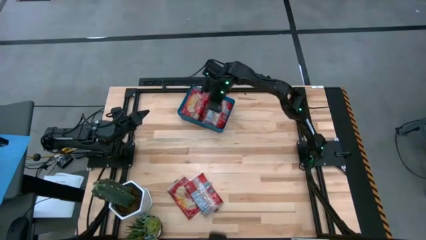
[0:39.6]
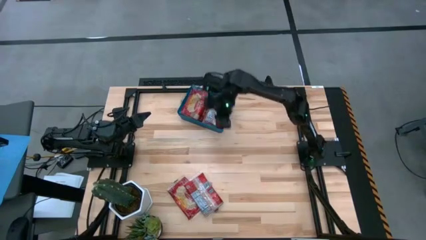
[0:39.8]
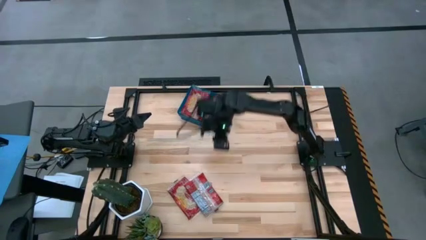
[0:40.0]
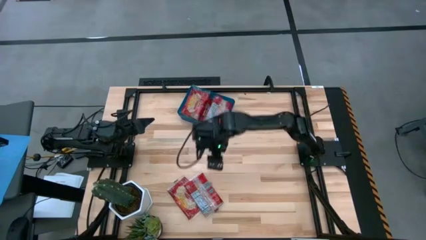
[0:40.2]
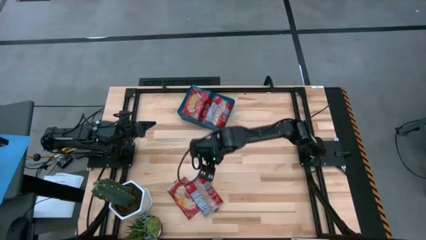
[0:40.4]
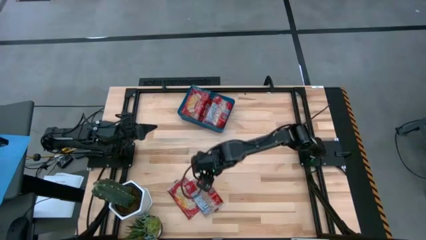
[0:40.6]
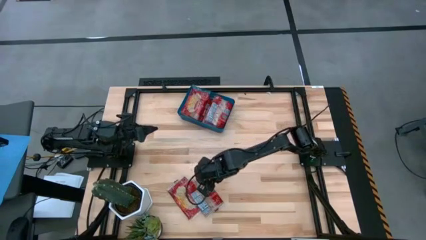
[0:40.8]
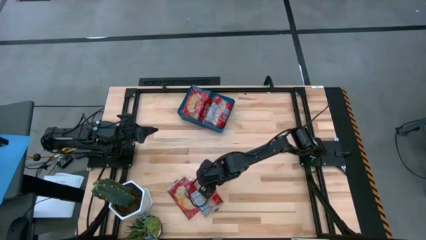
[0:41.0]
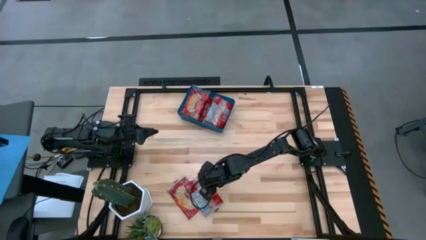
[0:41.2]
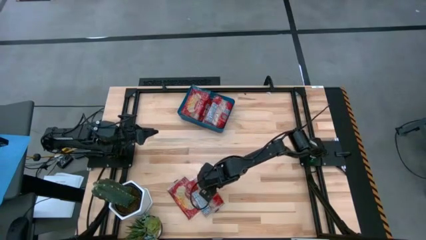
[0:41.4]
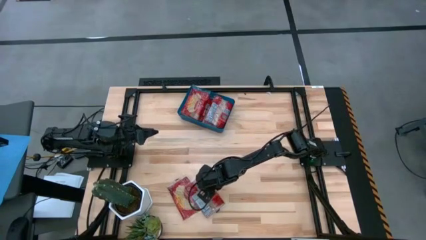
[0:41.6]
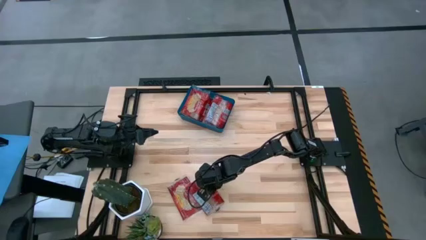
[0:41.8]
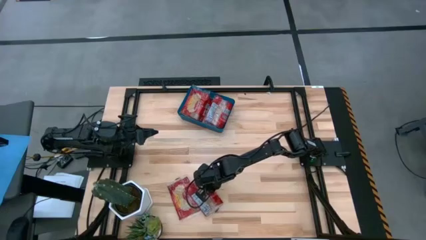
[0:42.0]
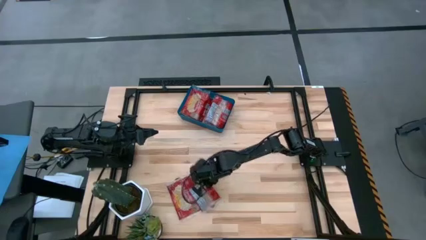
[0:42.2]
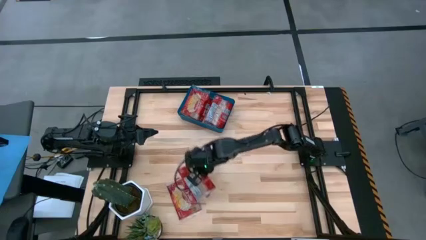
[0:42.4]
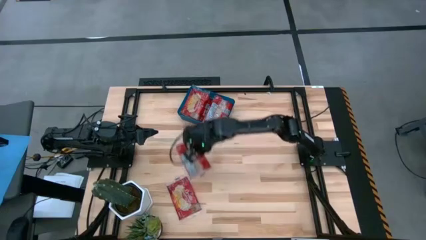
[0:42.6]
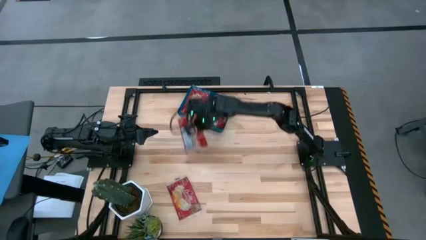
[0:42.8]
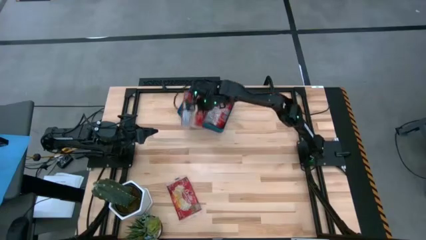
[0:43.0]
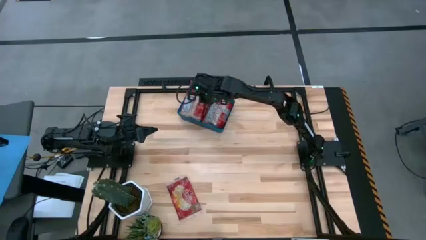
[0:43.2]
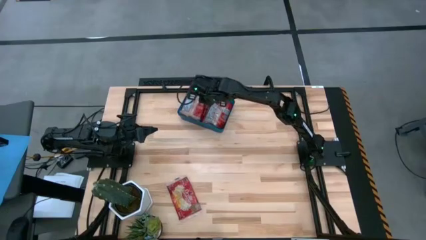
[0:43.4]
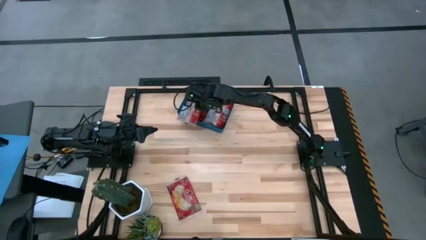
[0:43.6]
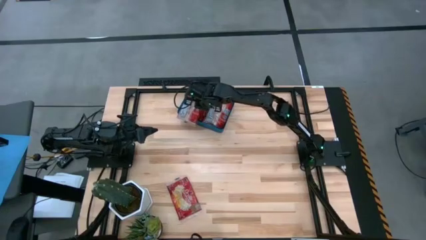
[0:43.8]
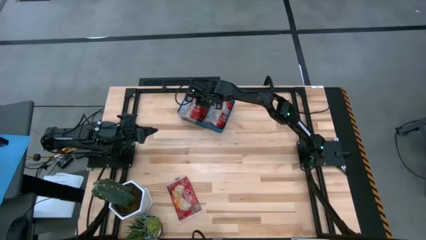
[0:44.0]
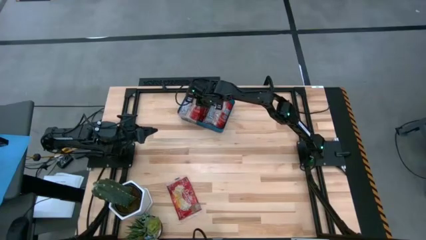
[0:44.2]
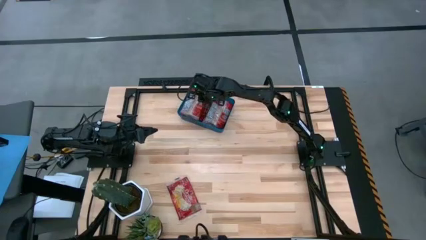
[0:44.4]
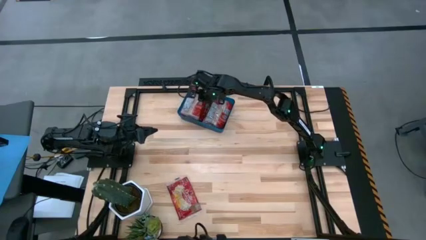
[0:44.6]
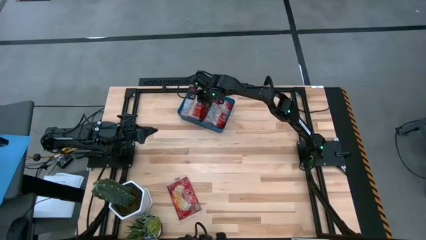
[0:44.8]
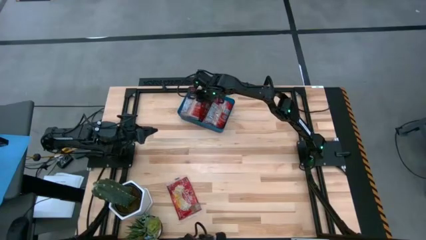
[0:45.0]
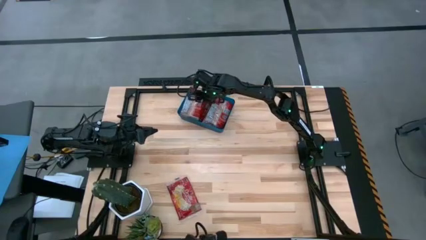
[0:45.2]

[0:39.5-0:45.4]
Task: Sort popcorn bags into baskets
Put the red popcorn bag into the blue bin

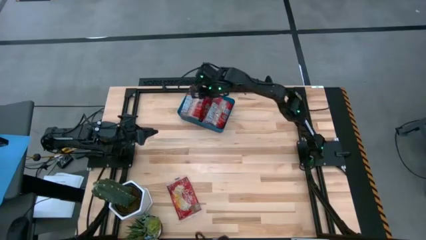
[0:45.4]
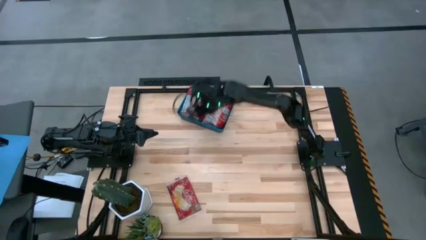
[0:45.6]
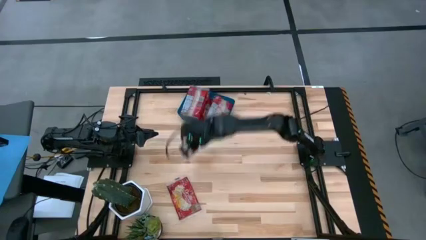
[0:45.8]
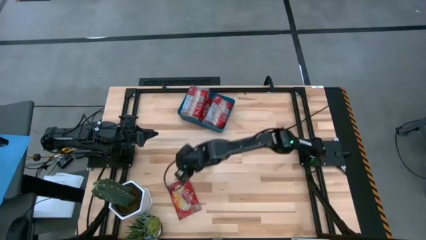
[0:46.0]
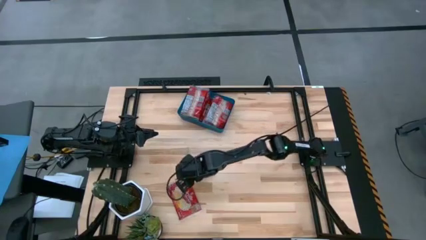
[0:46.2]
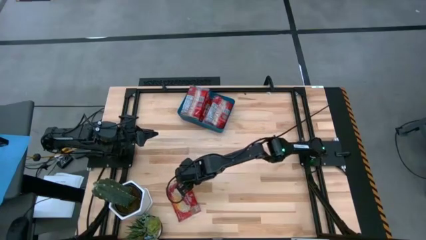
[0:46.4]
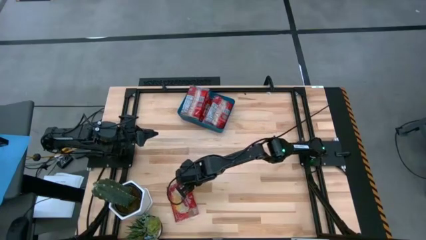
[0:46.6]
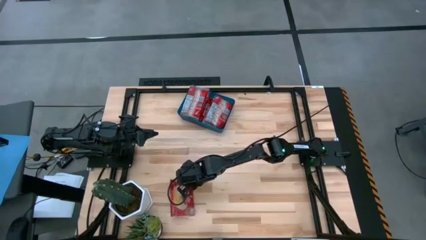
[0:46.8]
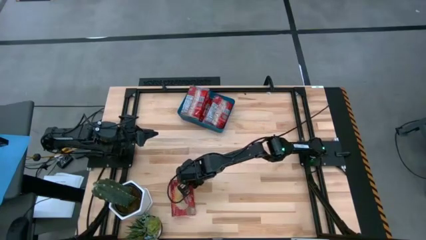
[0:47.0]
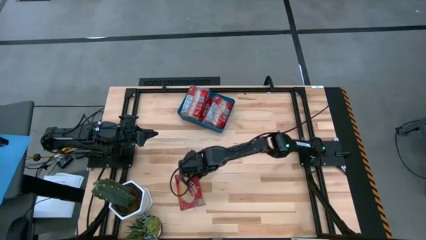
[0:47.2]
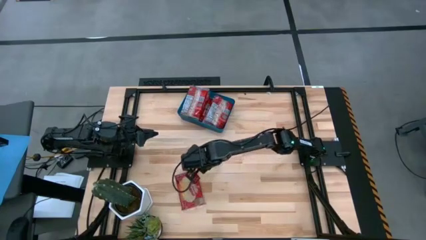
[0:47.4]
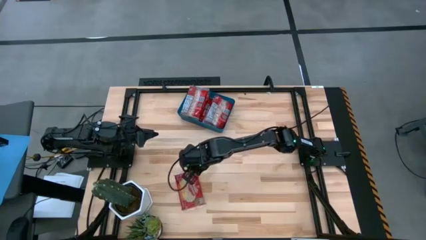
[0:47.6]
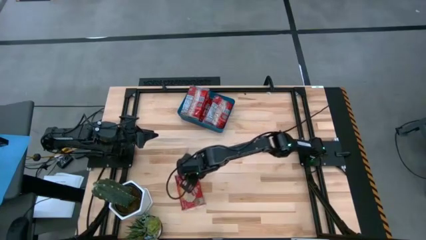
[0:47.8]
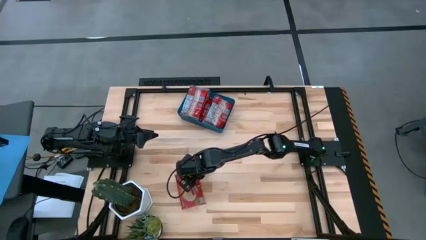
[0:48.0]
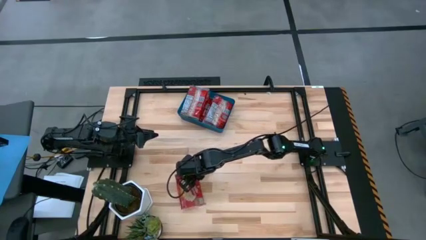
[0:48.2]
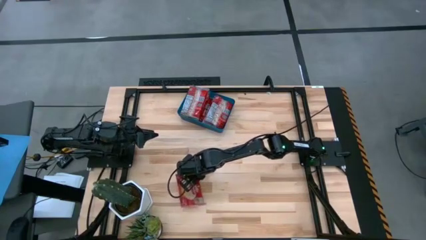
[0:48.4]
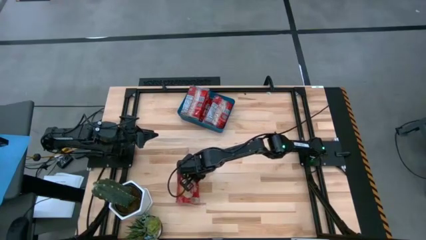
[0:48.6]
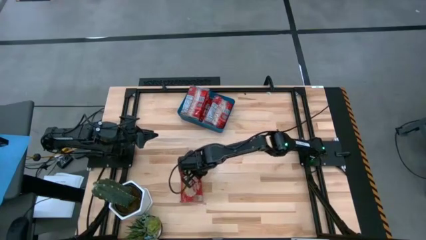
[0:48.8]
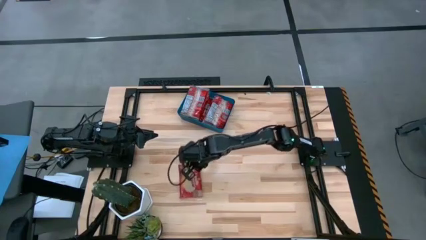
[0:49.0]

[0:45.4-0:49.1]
Put the red popcorn bag into the blue bin

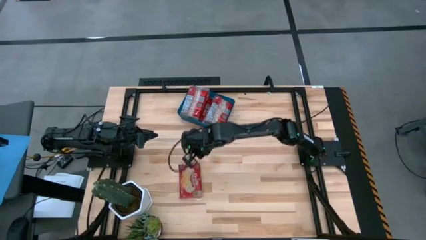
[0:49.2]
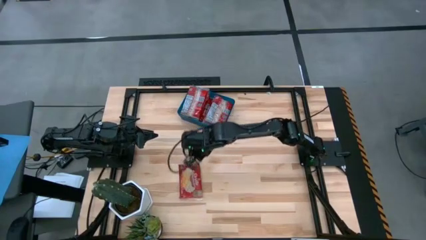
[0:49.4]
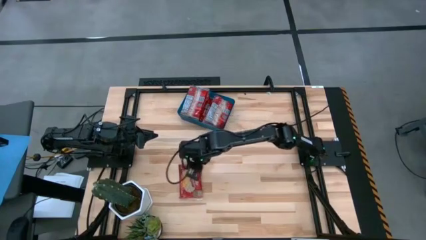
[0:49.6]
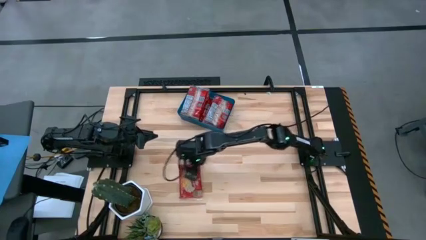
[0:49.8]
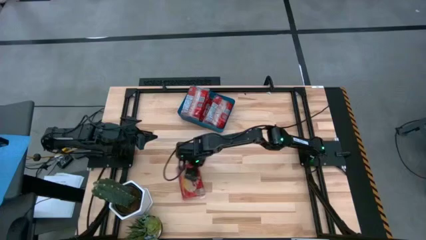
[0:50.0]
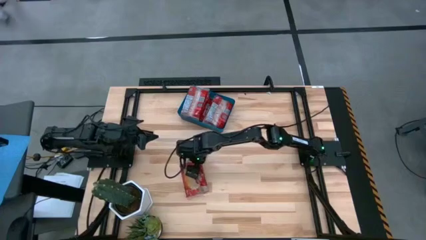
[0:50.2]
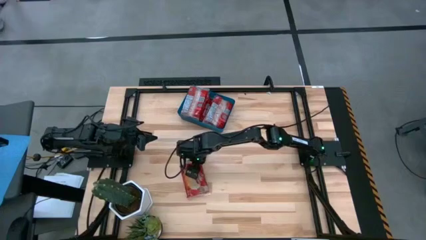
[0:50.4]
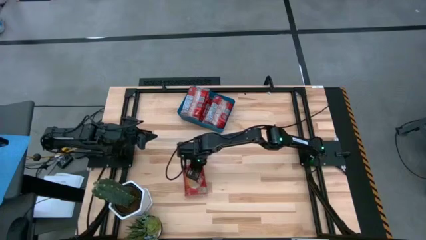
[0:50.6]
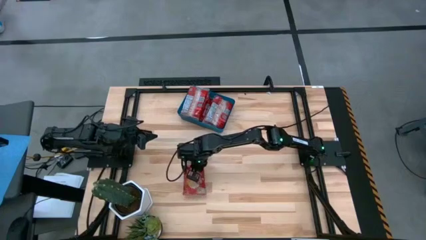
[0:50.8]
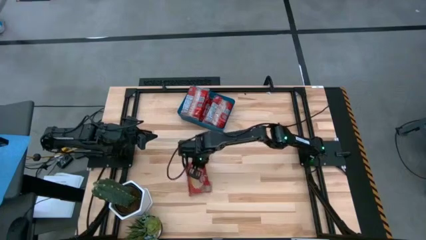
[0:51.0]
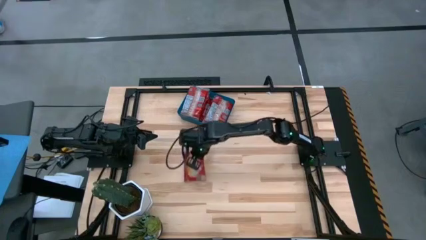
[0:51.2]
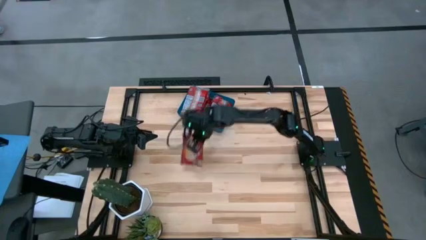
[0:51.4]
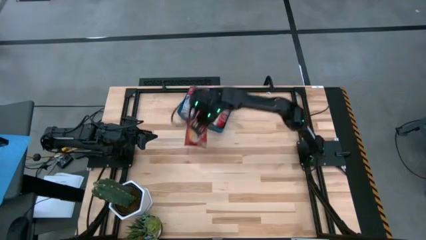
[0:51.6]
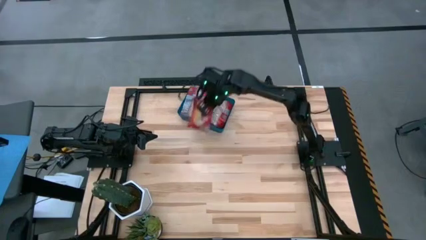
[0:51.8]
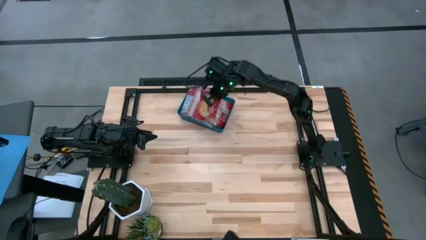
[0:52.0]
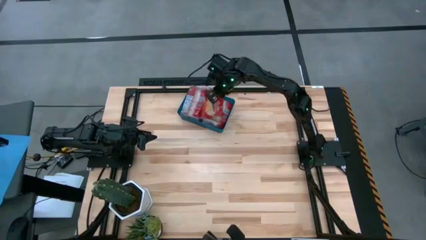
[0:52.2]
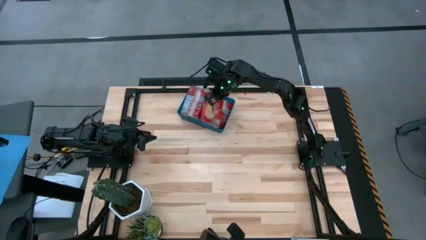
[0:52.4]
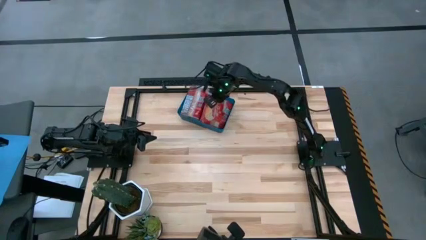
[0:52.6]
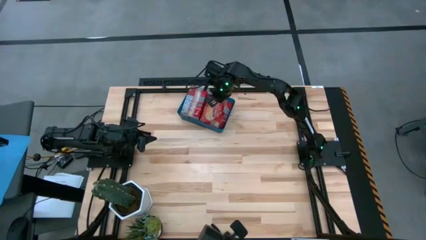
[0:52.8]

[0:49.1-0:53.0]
Put the red popcorn bag into the blue bin

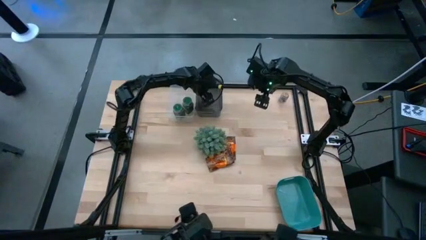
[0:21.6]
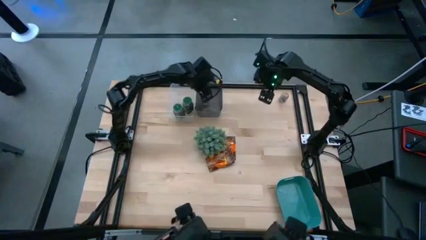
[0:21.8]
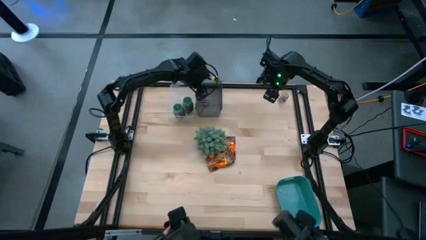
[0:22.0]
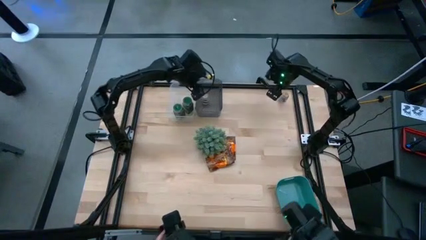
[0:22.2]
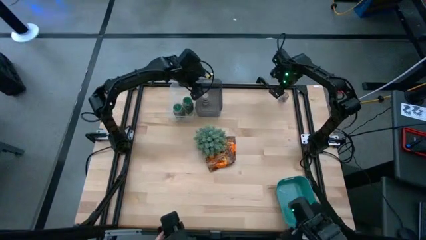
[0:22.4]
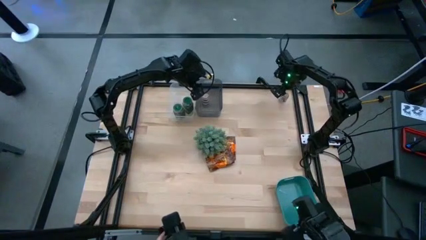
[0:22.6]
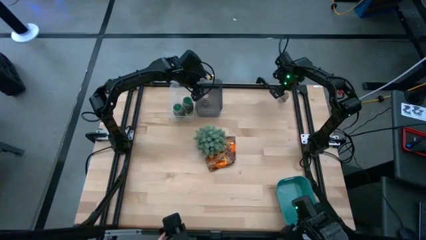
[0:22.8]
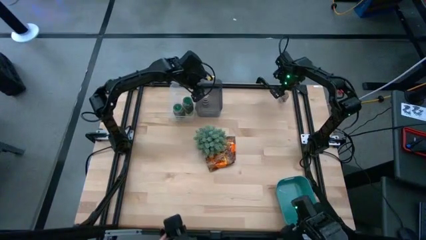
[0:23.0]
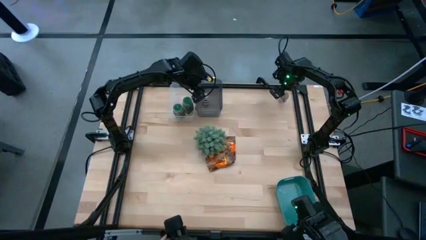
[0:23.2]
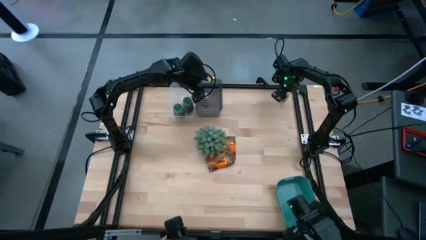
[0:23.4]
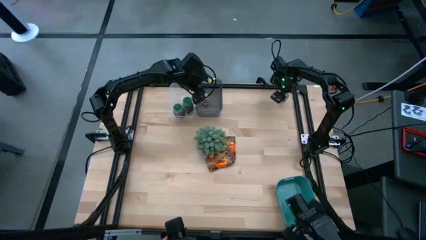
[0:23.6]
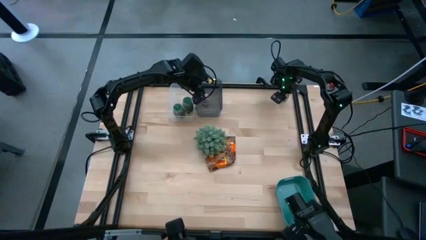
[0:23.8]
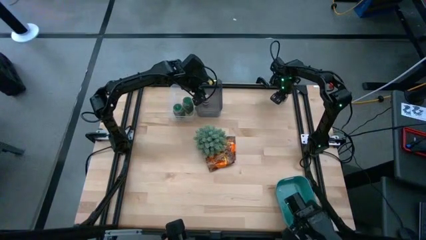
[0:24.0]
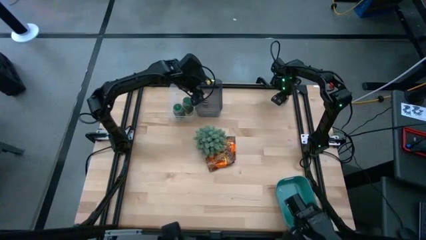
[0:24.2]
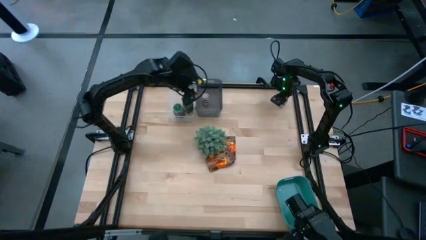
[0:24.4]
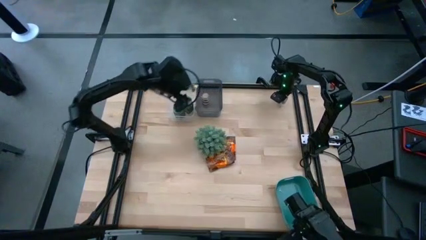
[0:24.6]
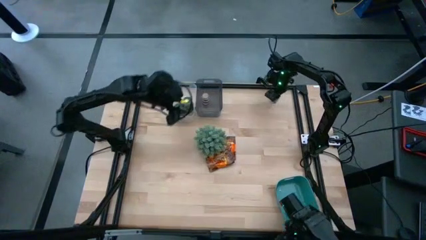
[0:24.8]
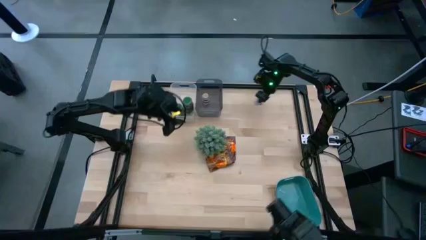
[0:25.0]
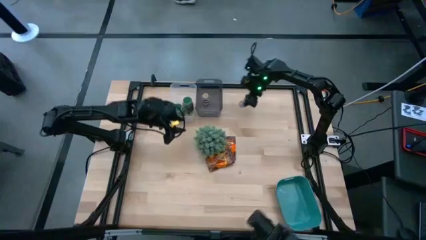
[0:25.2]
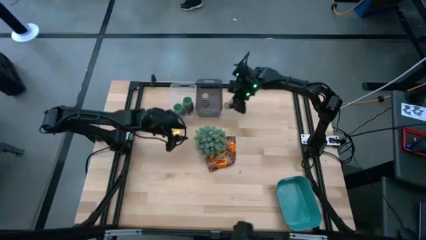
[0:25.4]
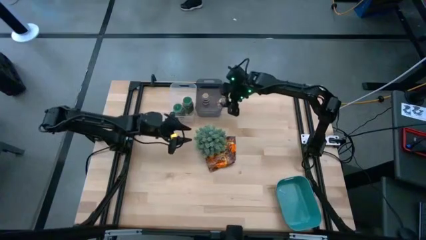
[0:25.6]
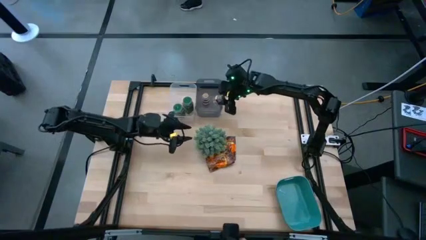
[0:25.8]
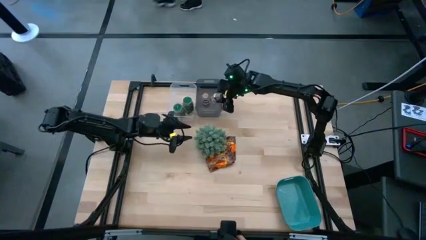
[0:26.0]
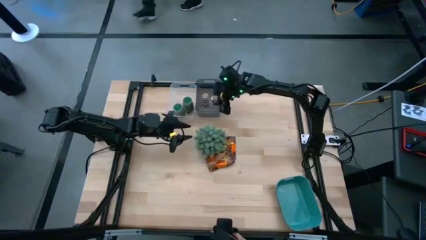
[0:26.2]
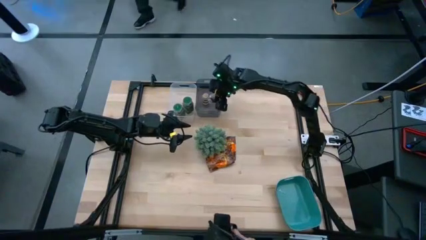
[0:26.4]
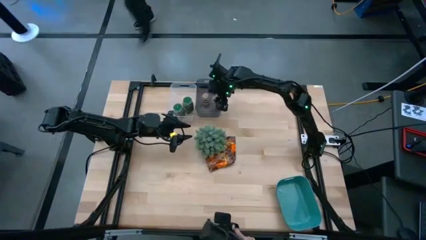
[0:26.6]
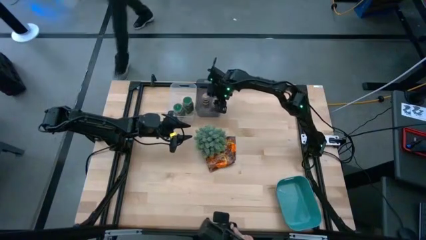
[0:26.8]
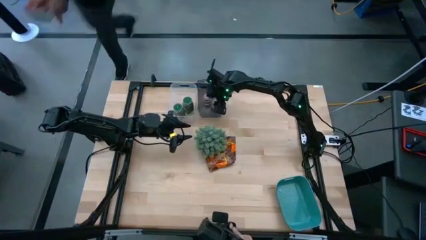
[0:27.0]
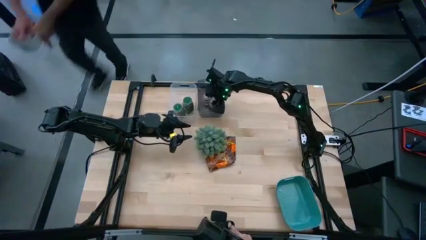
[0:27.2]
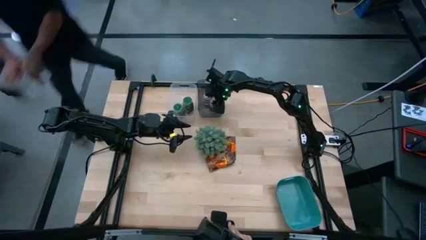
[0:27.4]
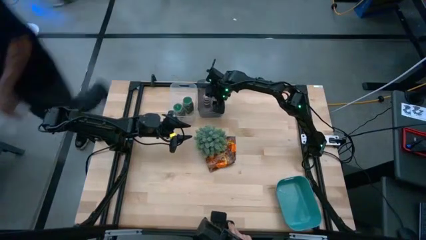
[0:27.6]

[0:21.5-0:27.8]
Task: Sort spices by type
Put the white bottled seasoning into the black transparent bin
